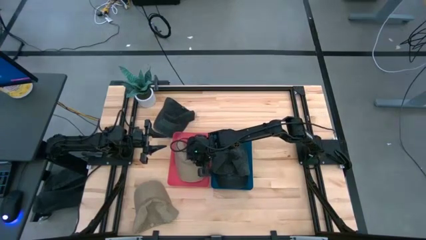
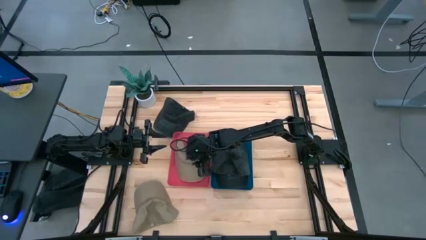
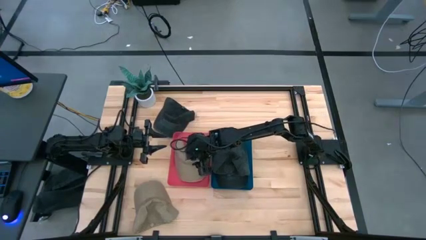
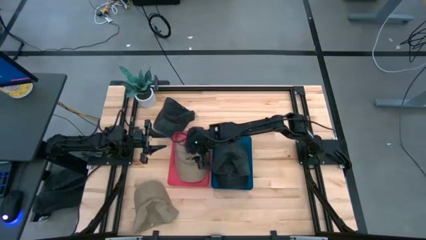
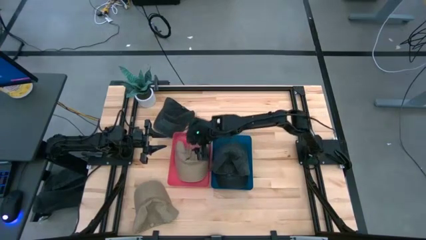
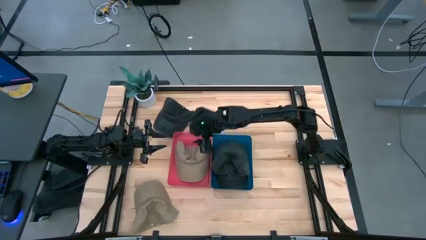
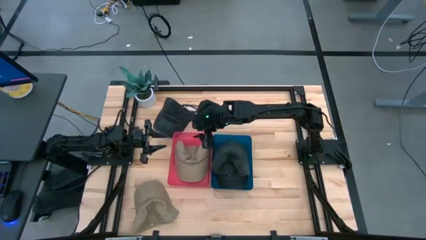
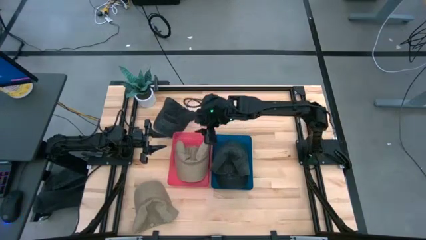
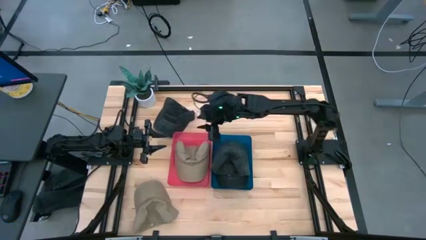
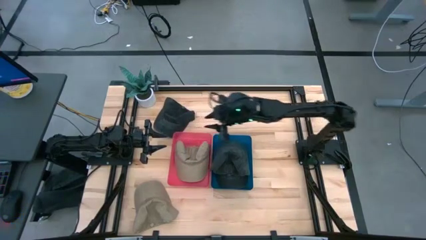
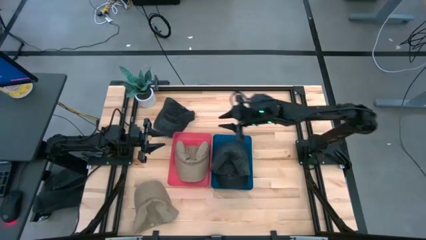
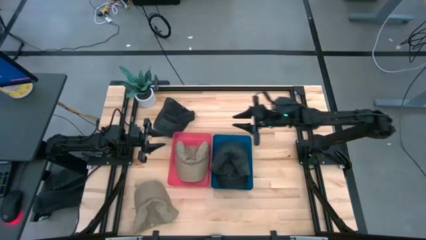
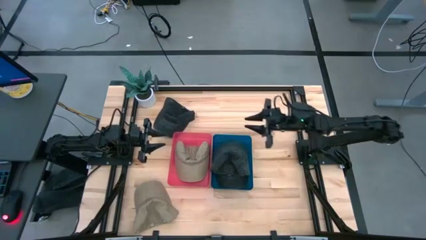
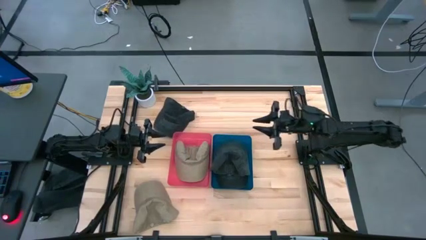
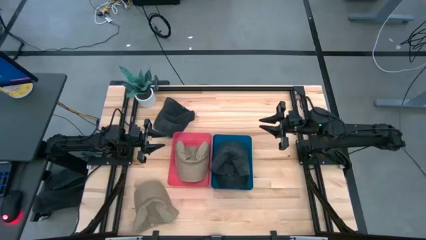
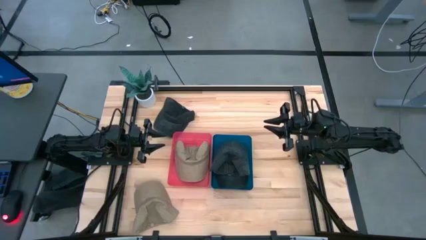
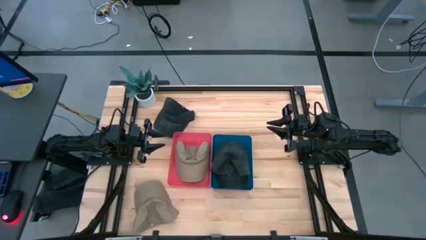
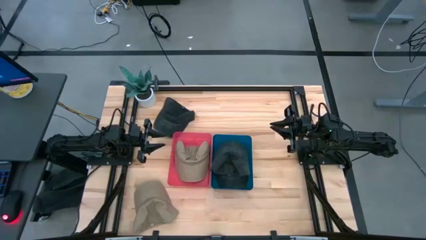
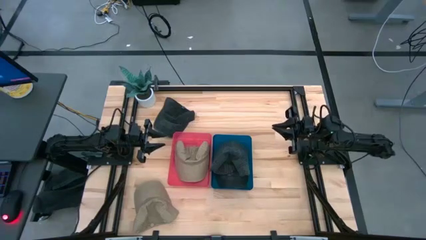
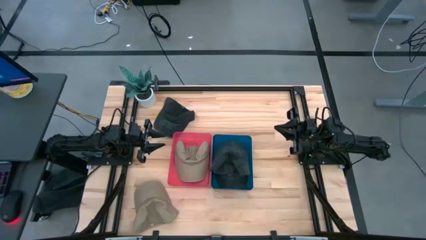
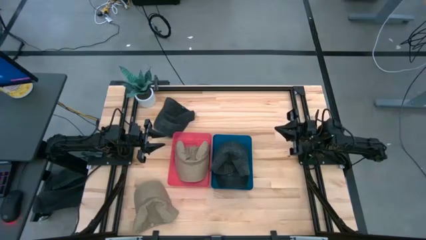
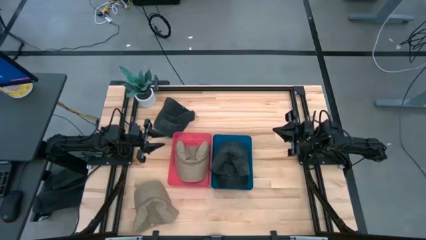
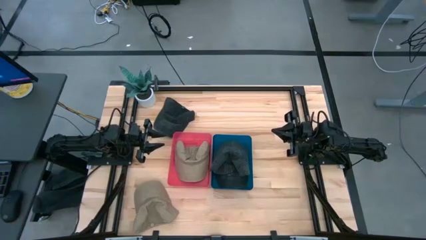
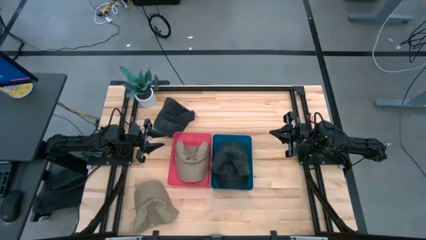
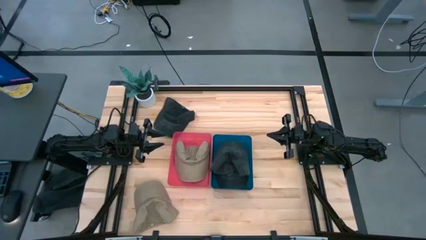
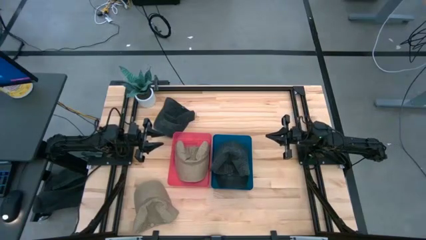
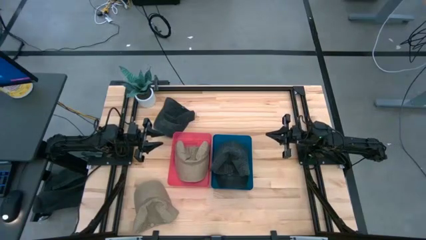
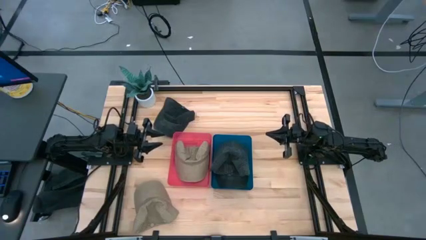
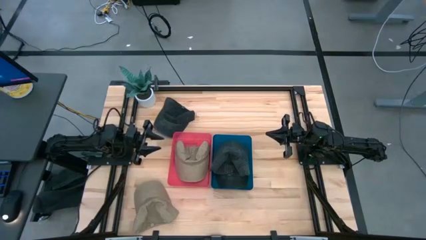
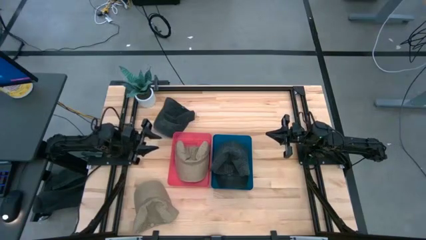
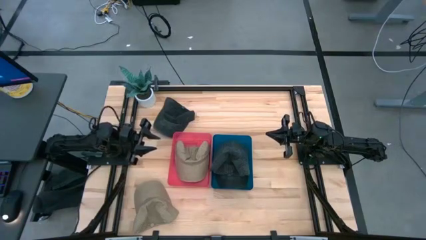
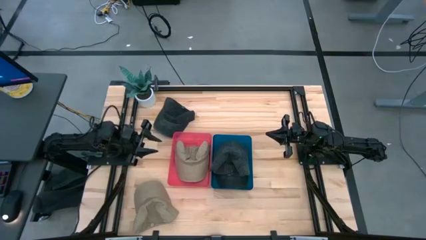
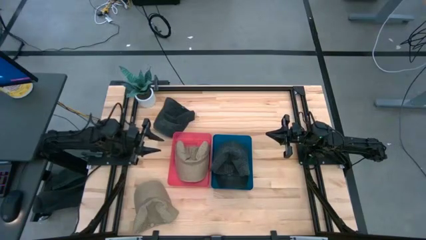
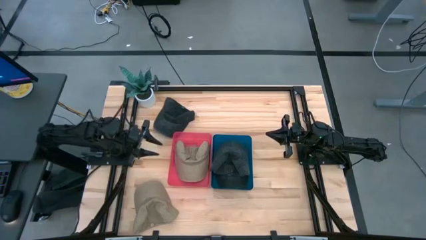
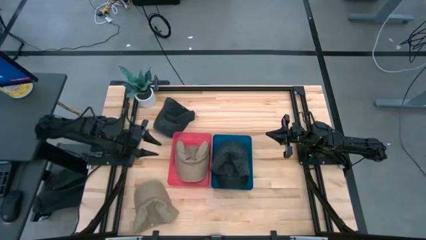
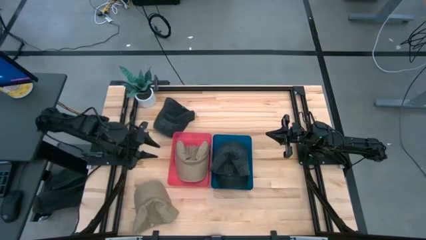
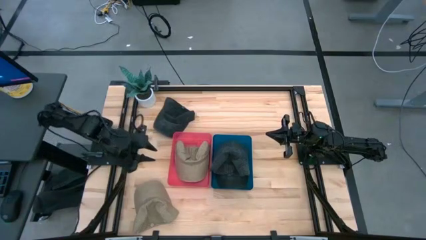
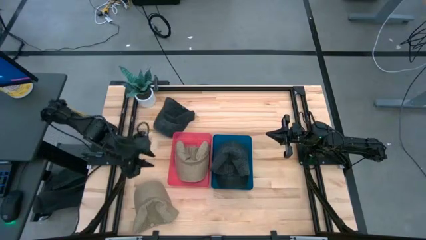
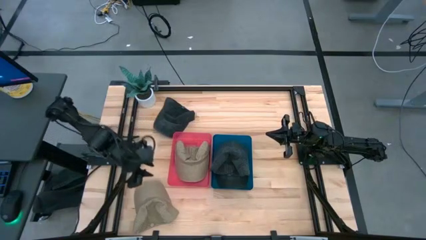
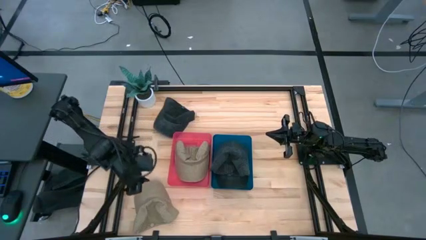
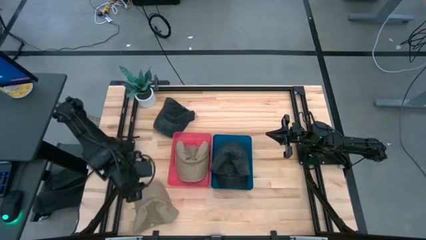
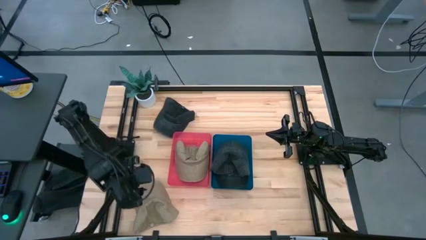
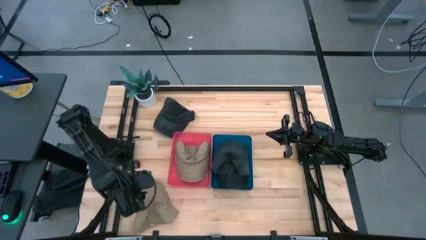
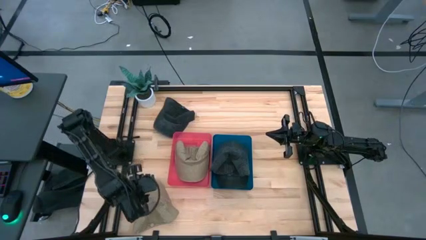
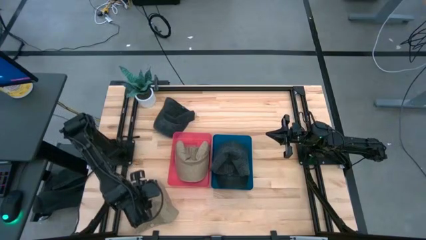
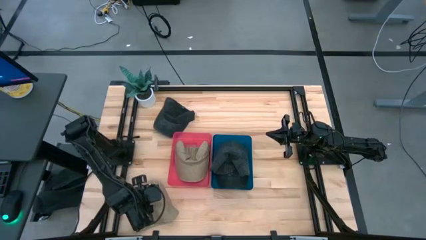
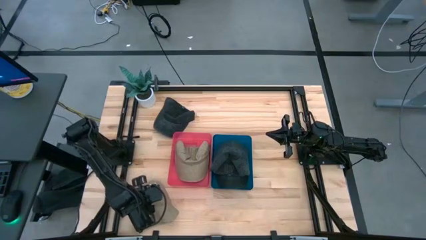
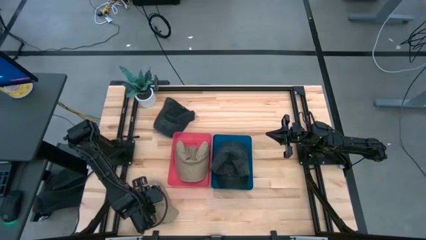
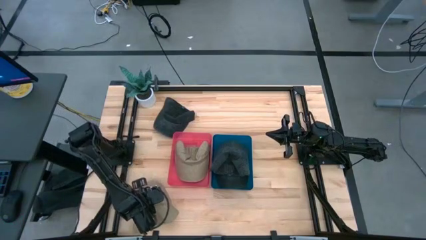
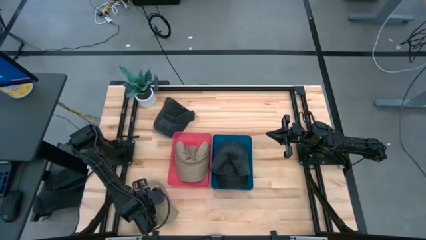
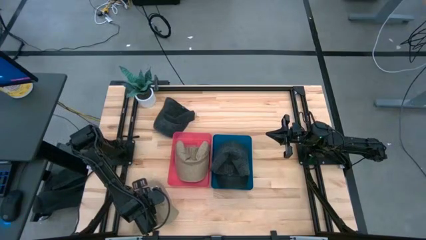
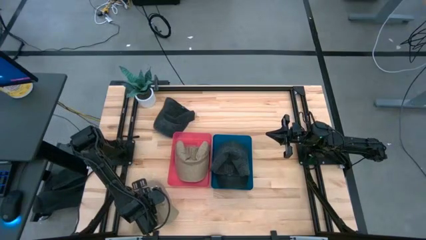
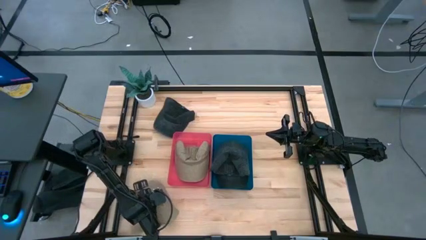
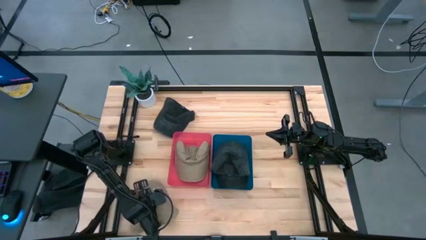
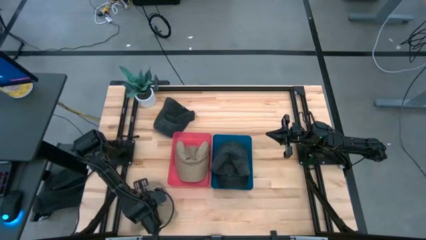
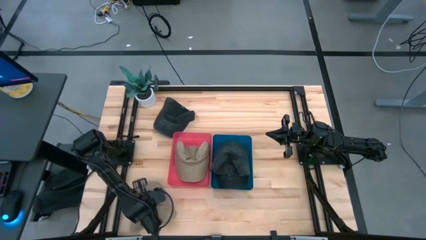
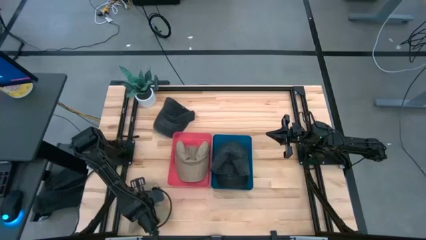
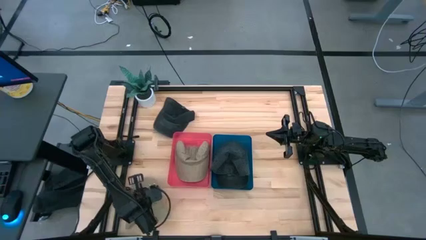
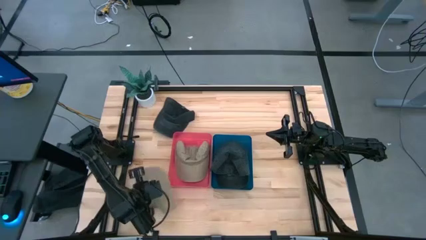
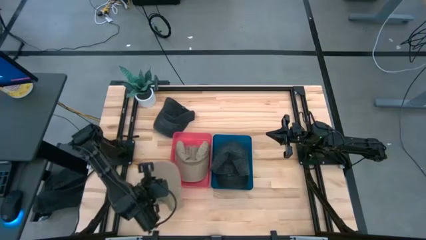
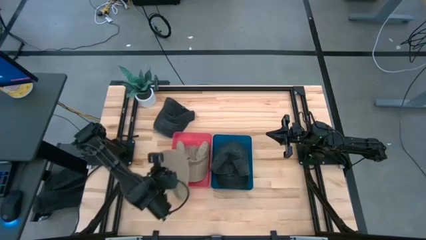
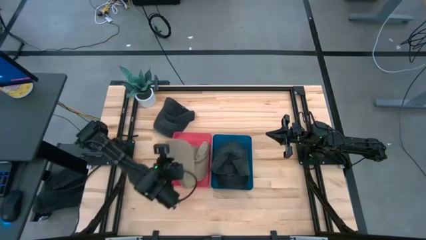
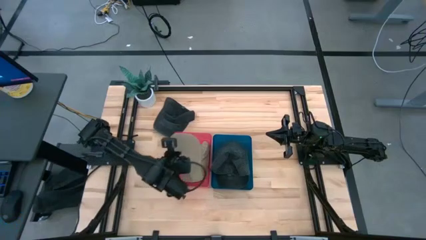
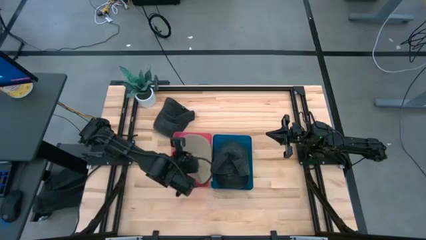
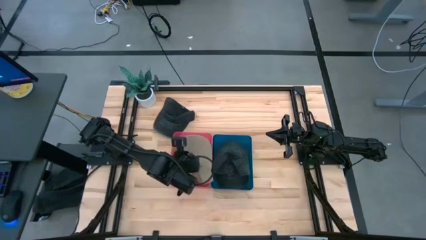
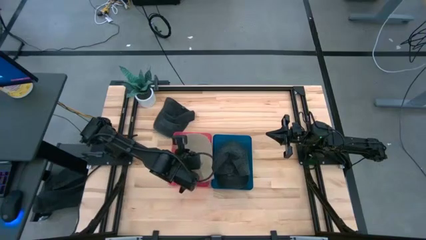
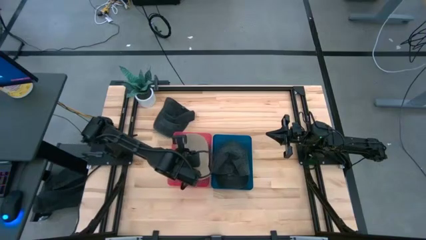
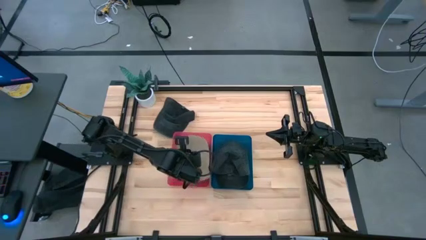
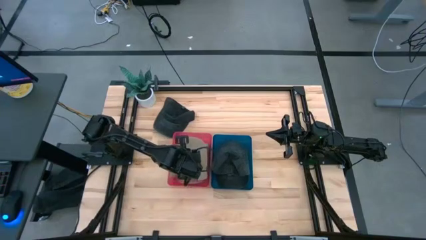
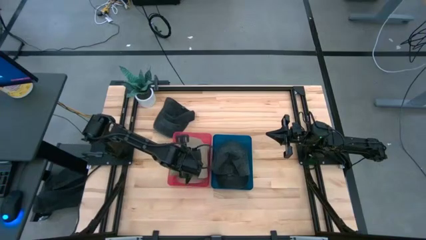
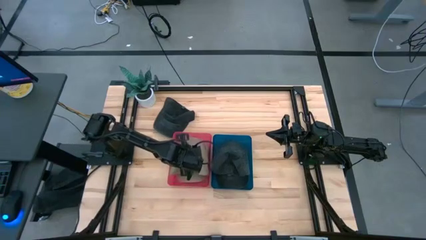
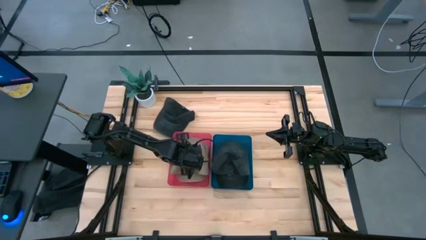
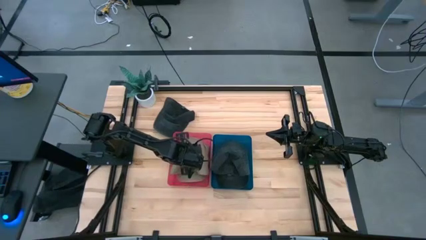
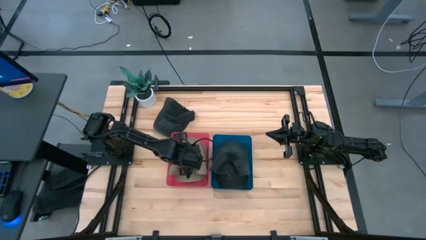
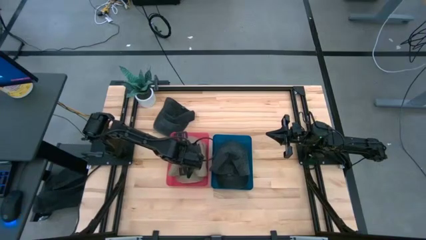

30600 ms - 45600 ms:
Task: Pick & Place hat
Put the brown cap into the red bin

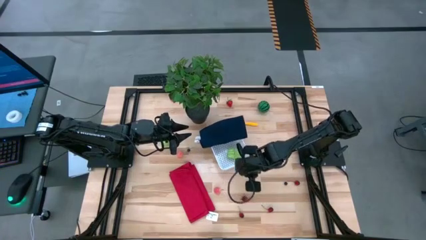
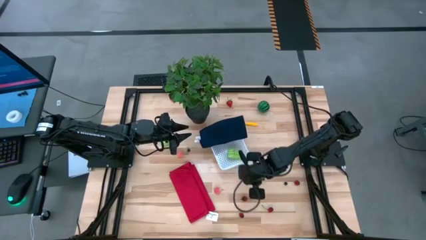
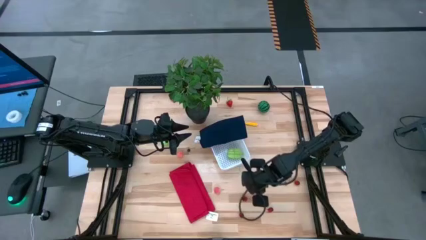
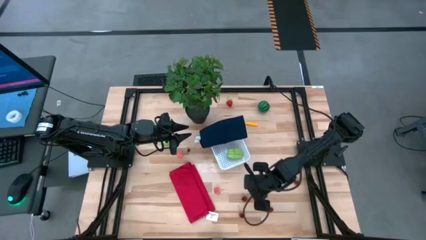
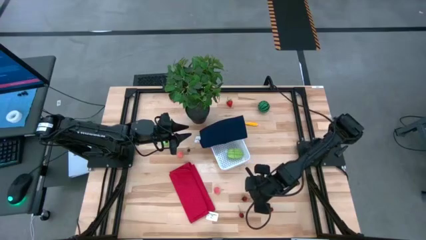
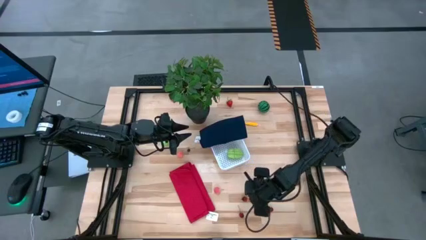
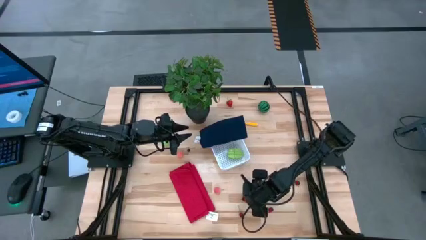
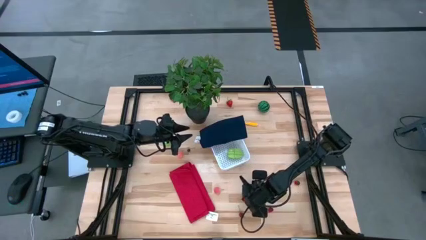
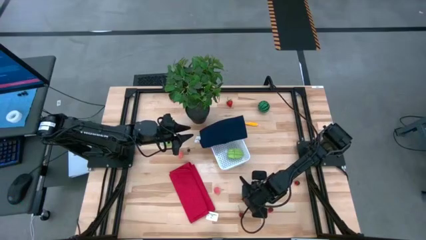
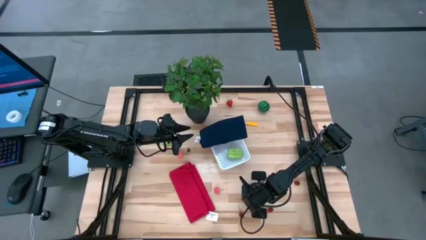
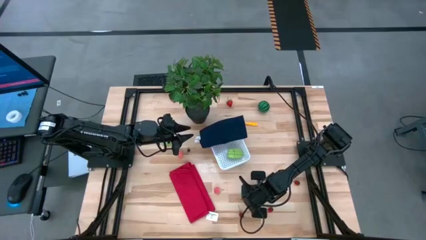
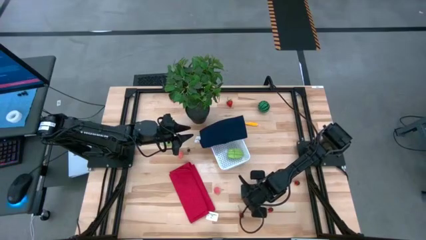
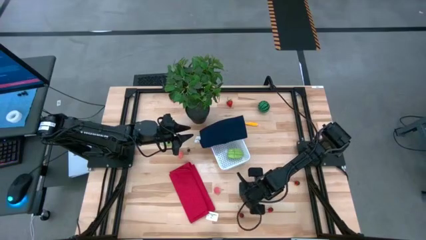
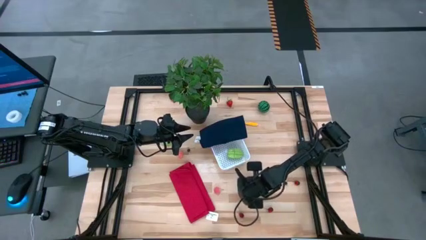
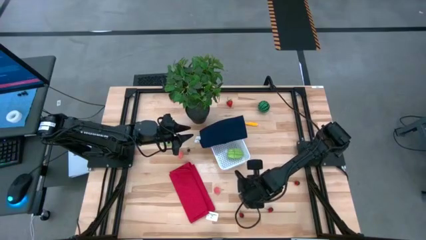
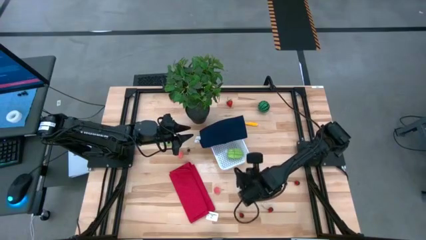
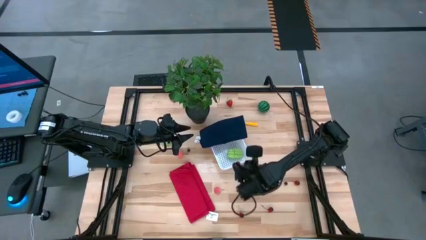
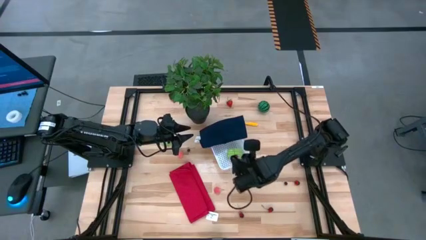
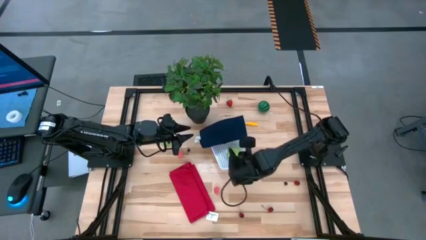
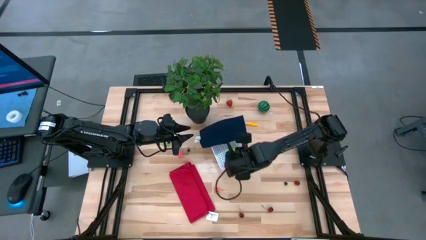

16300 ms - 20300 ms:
Task: Pick and placing Produce into tupperware
Put the cherry into the bin
